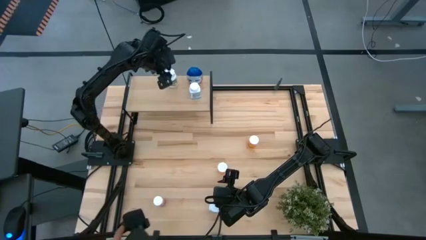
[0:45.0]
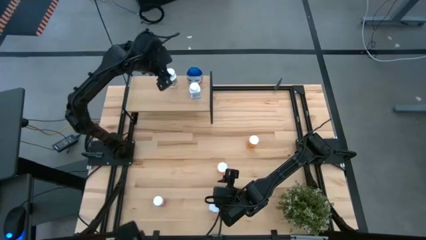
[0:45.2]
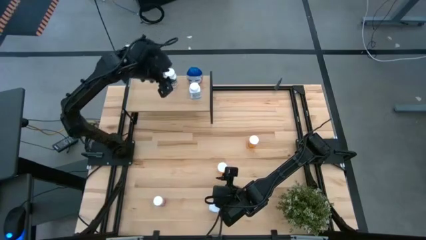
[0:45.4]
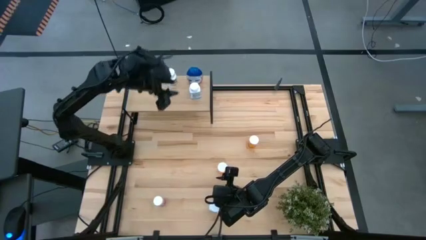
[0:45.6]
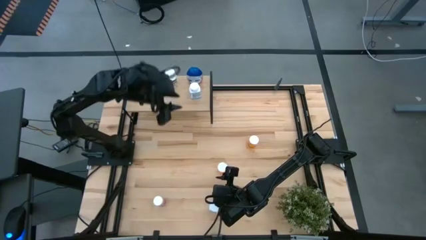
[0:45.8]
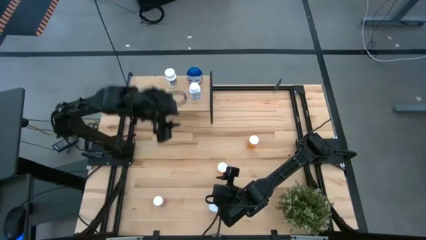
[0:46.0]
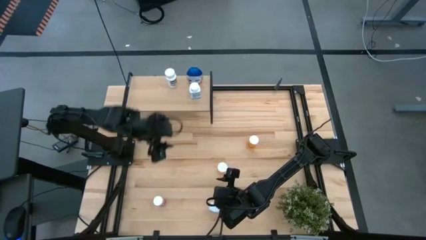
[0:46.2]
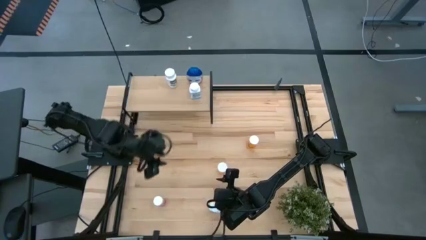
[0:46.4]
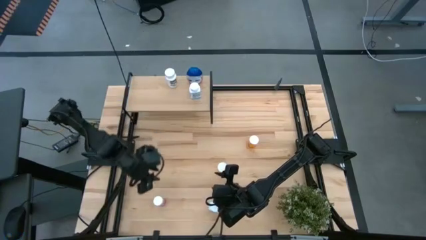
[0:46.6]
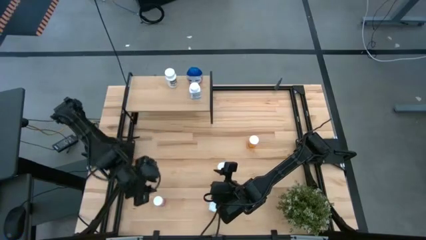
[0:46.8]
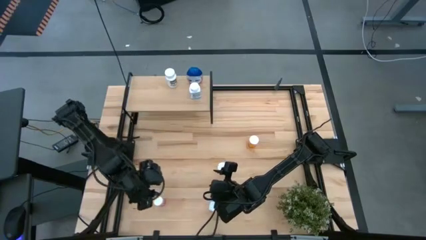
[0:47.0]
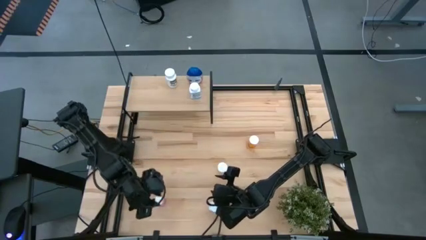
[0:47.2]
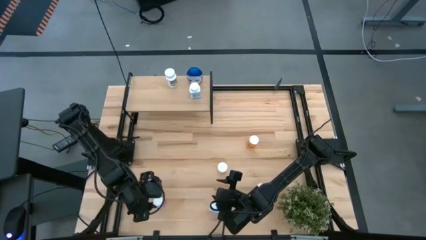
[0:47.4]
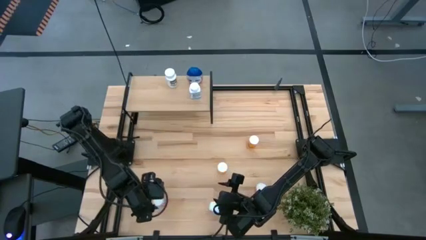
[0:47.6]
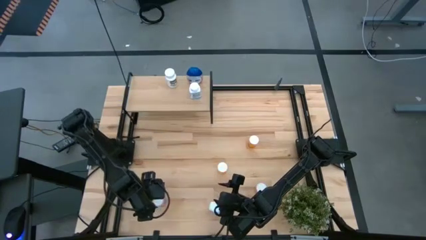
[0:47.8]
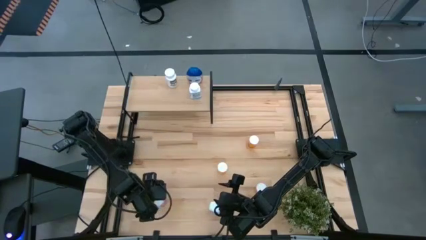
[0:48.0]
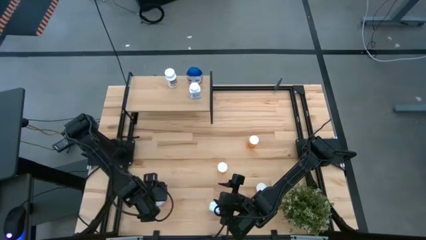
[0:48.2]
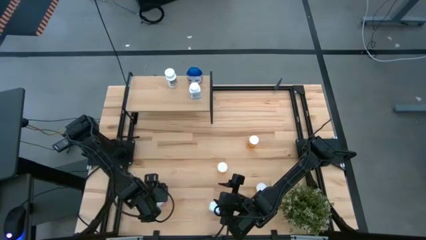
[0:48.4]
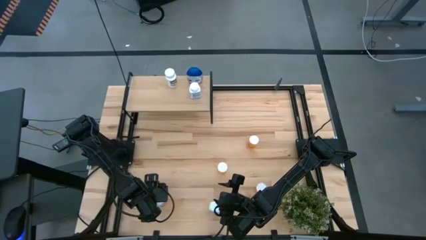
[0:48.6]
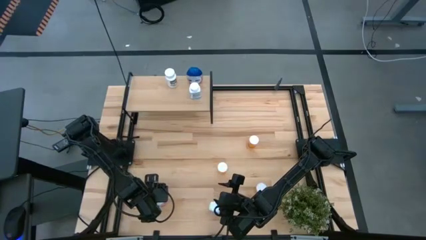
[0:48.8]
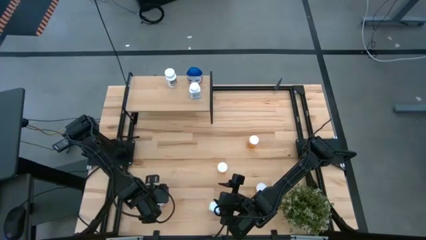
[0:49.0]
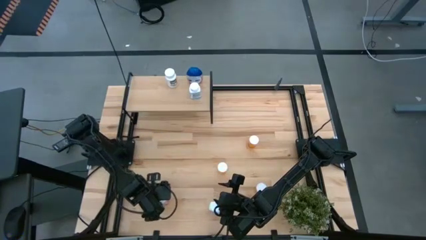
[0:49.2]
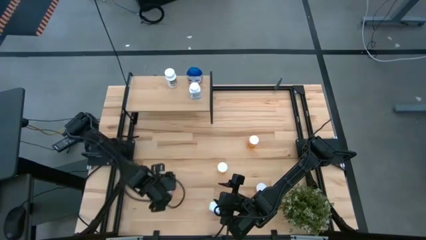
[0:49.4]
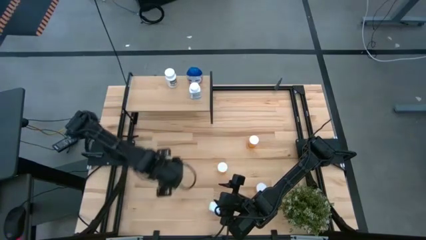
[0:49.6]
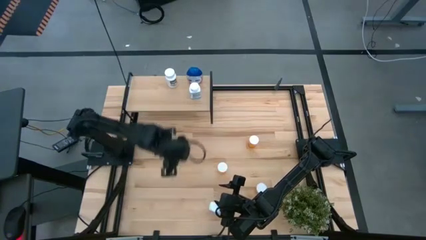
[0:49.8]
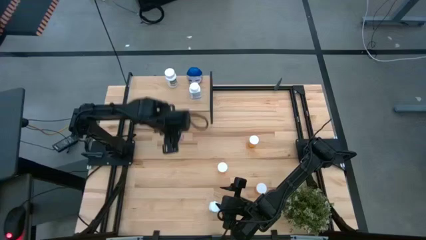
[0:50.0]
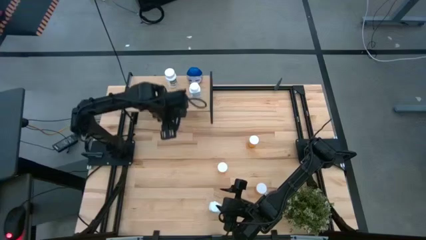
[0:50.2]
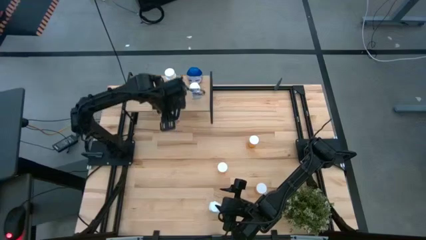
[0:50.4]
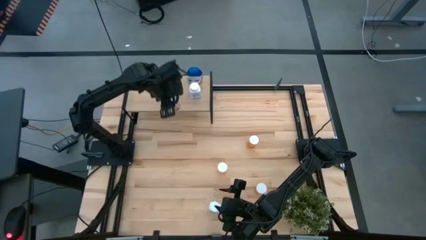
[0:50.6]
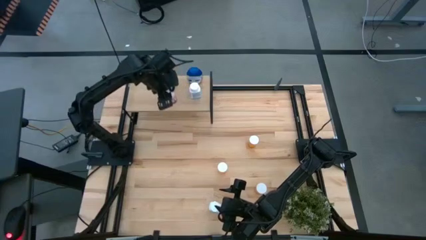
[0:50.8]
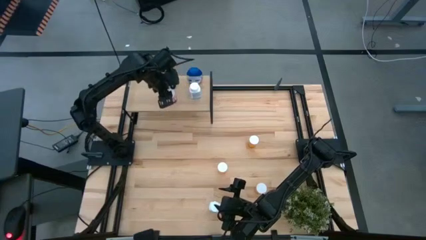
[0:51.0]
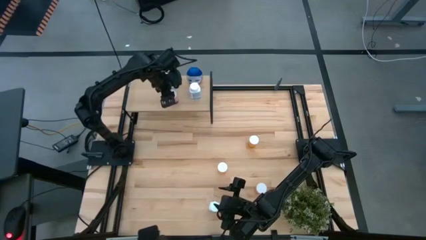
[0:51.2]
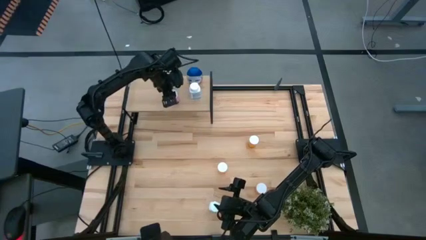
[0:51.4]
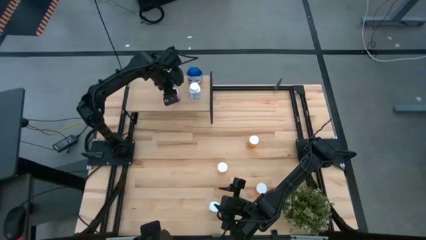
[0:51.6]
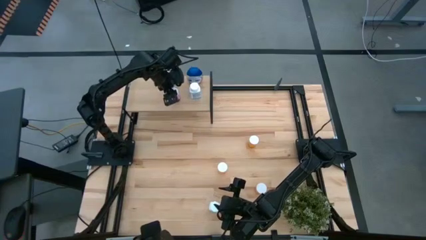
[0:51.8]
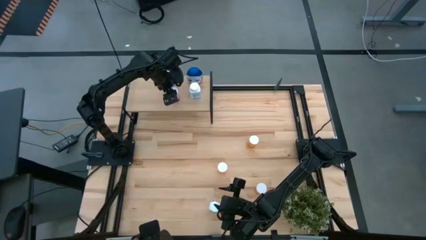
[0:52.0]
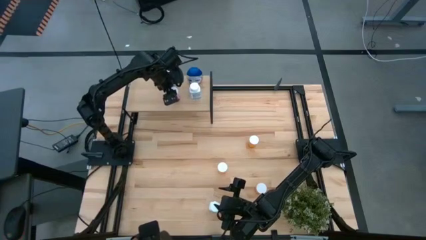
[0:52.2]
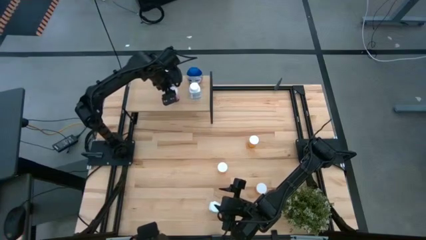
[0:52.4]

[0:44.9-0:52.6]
Task: Pick and place medicine bottles onto shelf by color
Put the pink pill bottle on the shelf

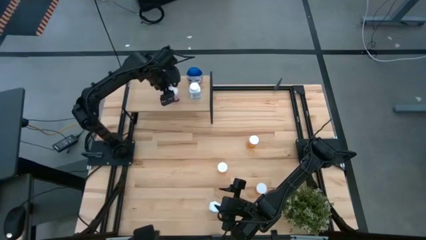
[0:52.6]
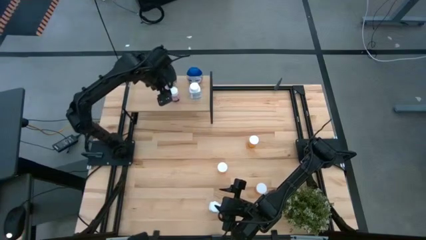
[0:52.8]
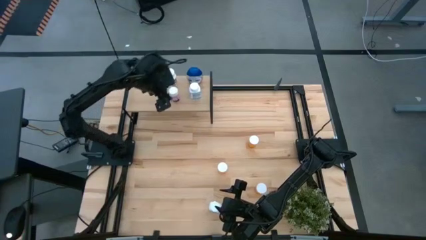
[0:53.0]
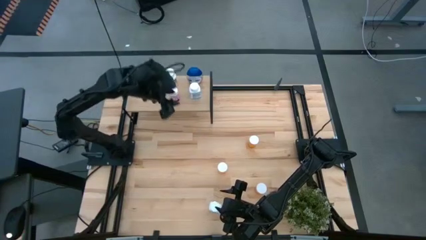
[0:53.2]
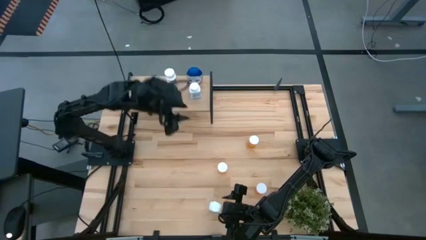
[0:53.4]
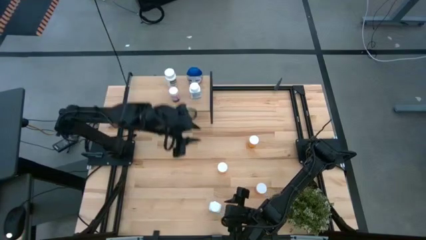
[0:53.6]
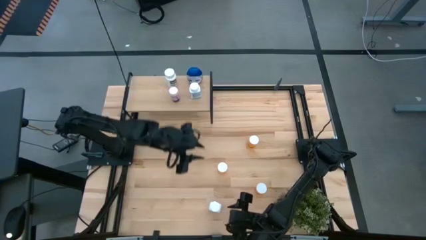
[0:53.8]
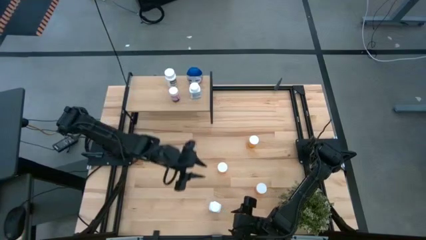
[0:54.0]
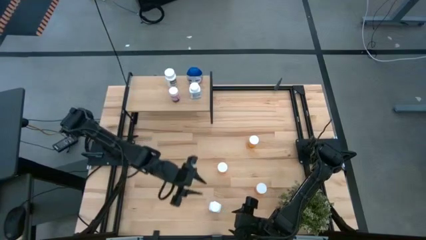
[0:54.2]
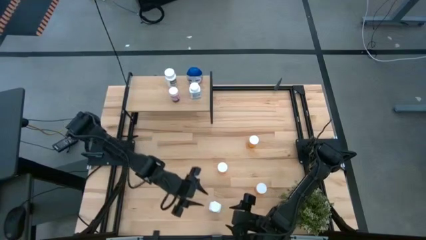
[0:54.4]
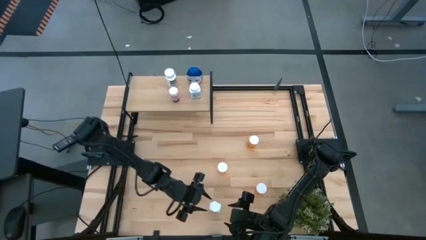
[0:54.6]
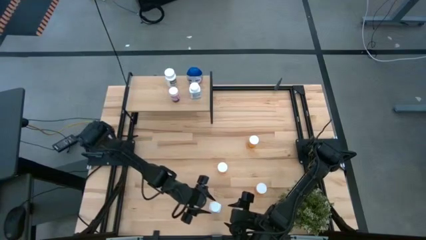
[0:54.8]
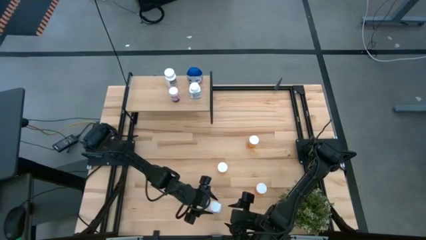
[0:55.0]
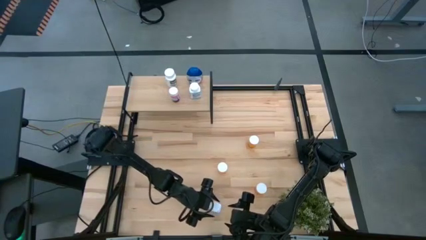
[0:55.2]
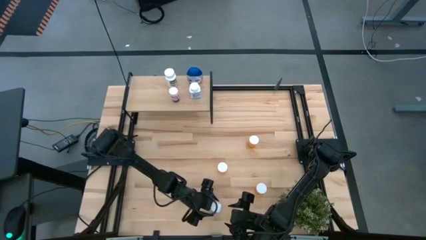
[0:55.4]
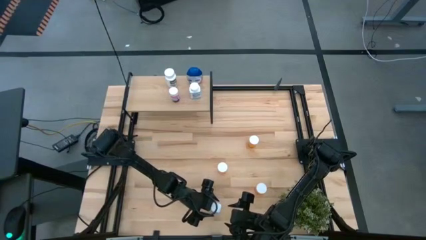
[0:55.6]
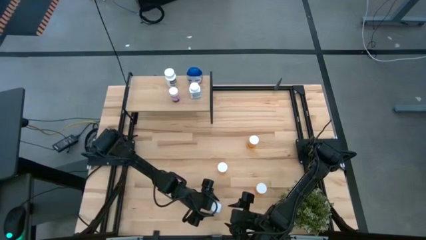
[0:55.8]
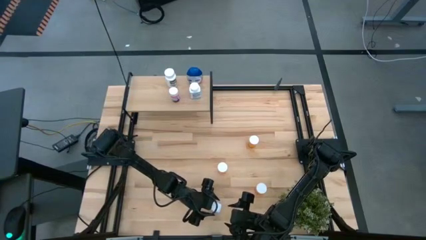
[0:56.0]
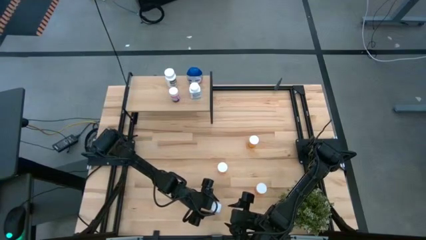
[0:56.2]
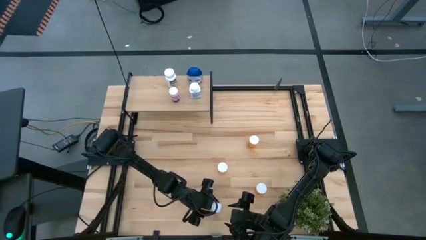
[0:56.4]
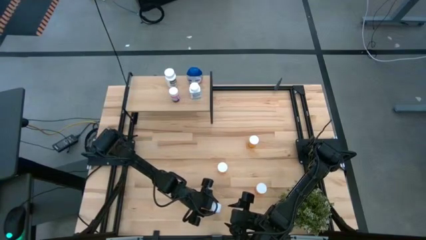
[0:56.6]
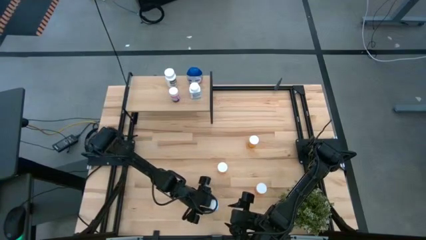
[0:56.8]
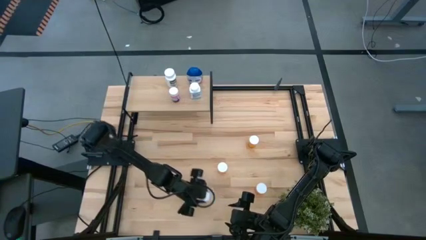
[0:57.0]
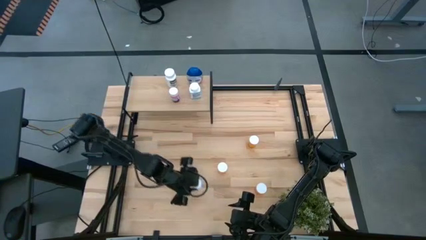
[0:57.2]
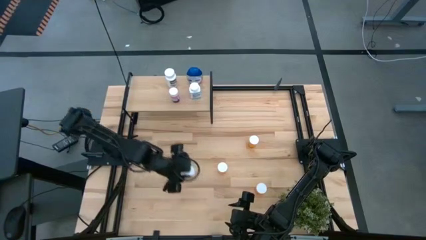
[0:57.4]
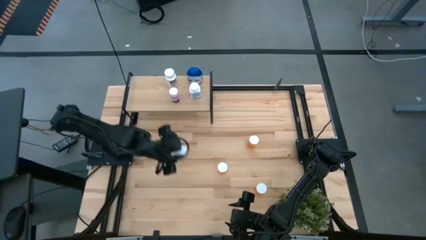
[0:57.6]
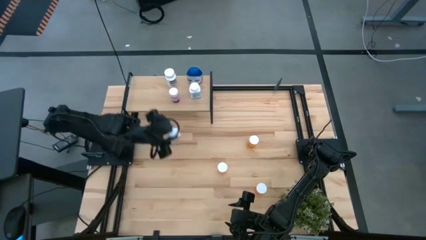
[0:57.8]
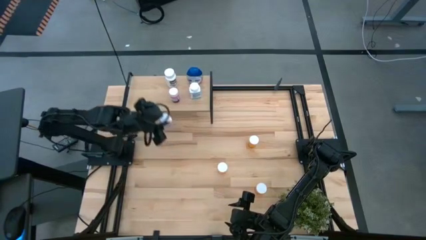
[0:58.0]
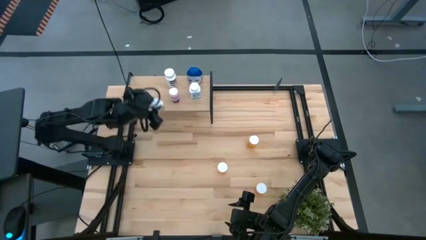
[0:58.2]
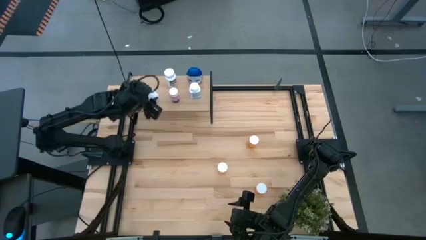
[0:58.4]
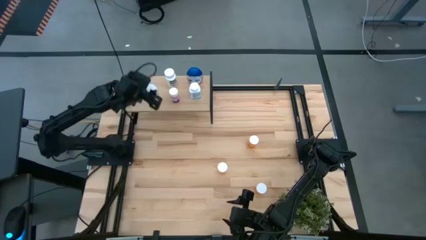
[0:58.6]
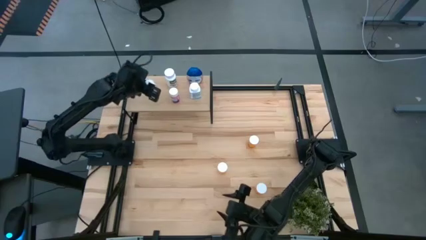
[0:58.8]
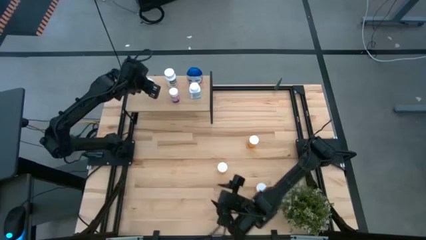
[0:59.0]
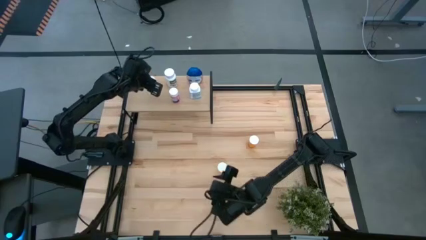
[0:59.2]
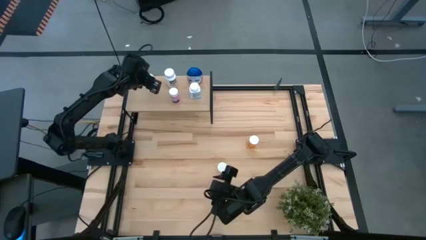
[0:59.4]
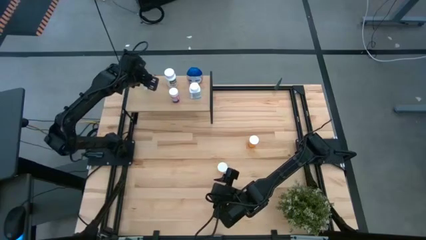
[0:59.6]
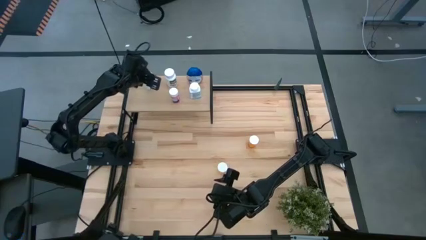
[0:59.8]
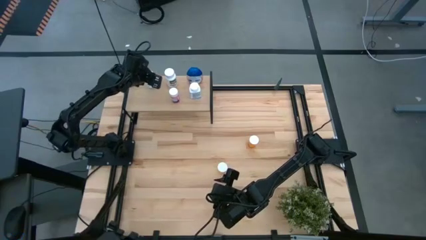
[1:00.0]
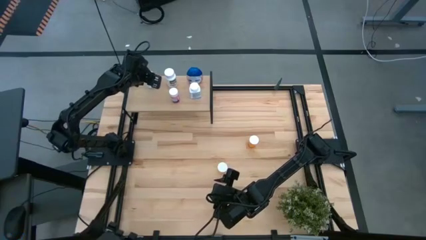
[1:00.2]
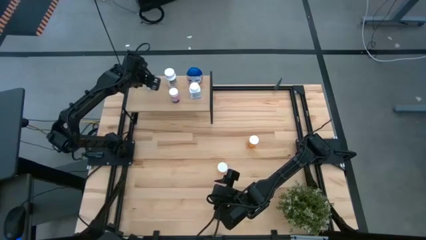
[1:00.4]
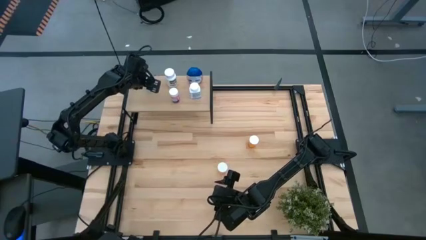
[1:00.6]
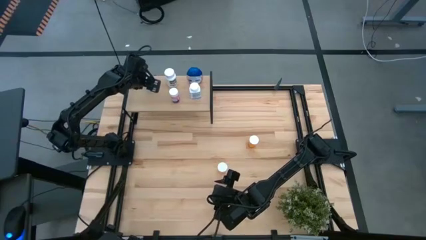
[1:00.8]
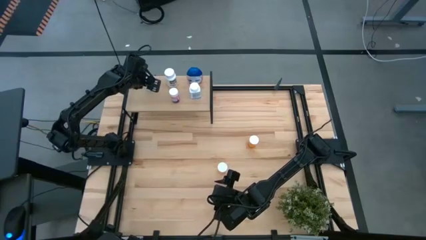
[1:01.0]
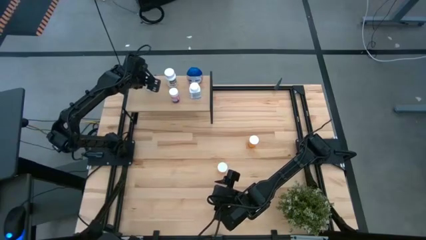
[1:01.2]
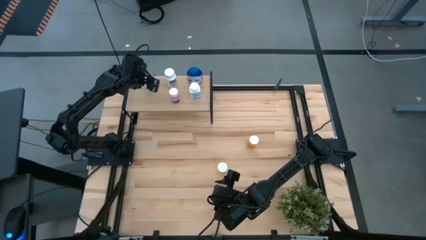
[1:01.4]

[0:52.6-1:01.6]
Put the light blue pill bottle on the shelf
